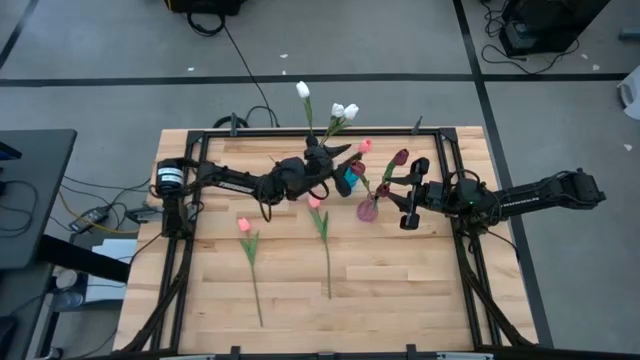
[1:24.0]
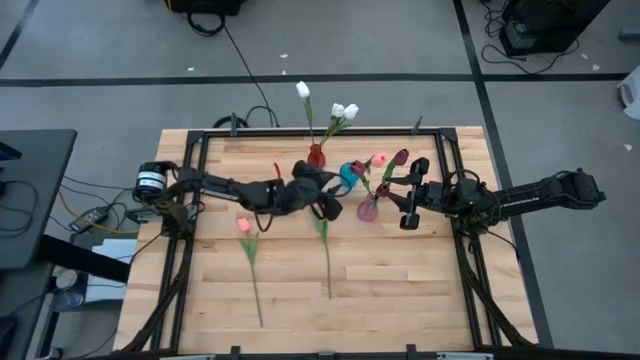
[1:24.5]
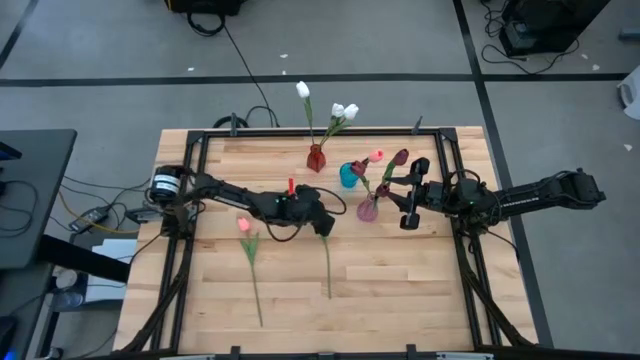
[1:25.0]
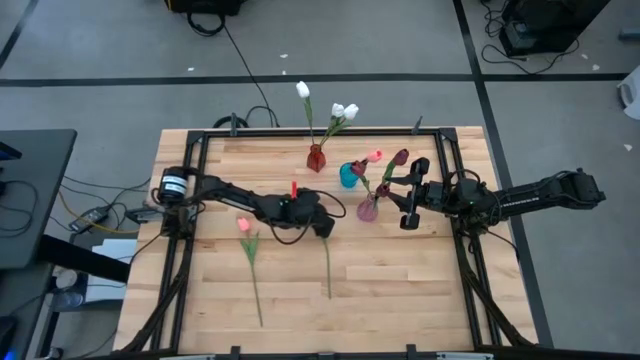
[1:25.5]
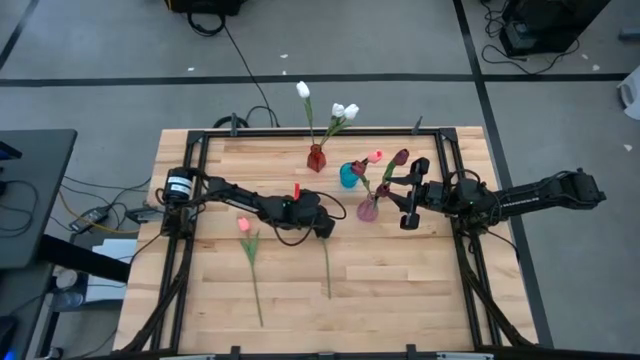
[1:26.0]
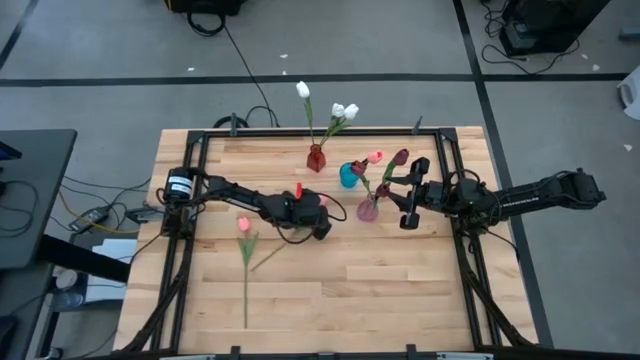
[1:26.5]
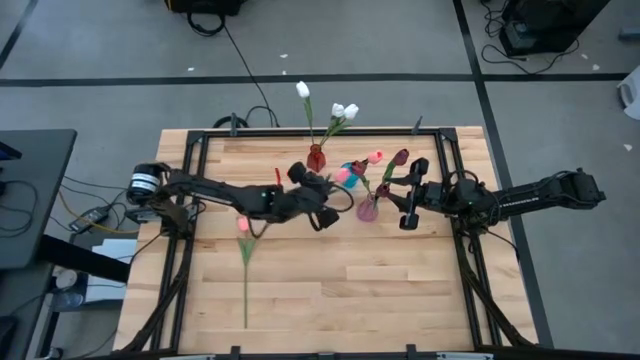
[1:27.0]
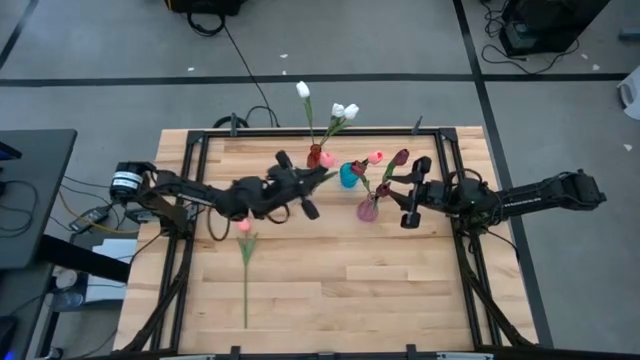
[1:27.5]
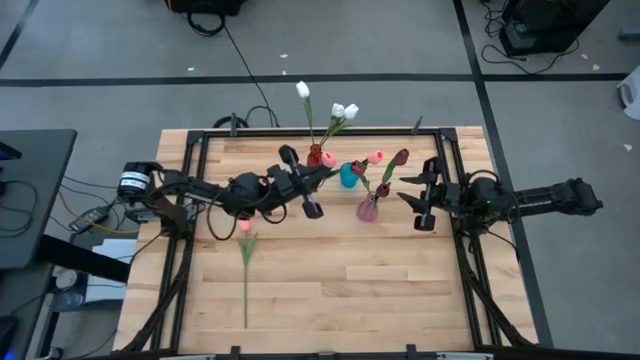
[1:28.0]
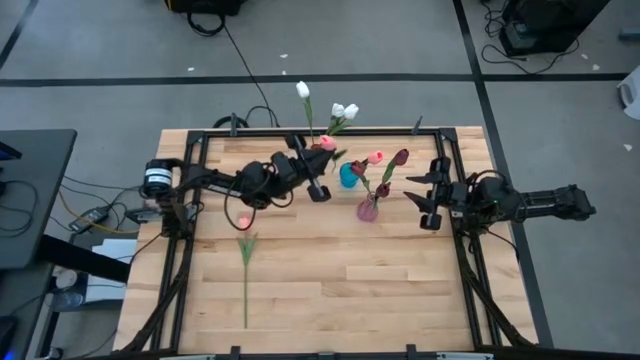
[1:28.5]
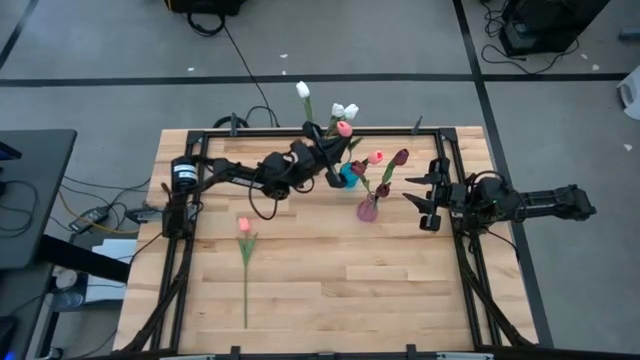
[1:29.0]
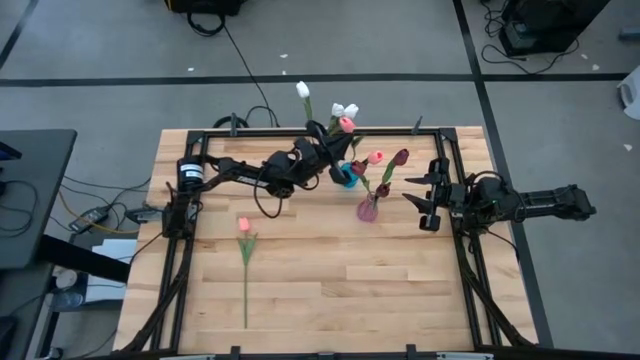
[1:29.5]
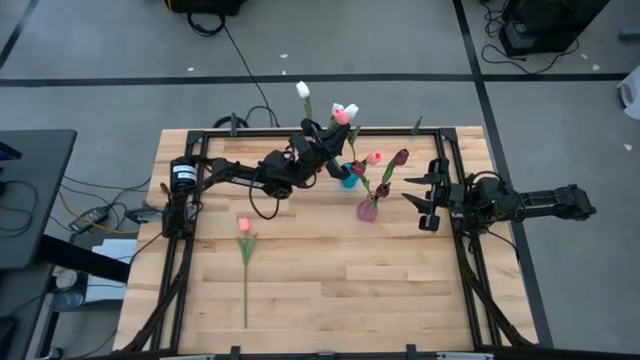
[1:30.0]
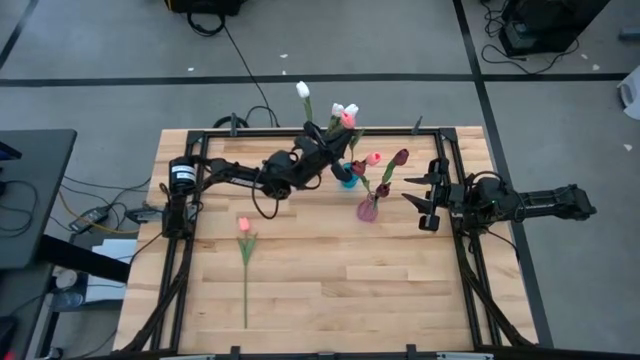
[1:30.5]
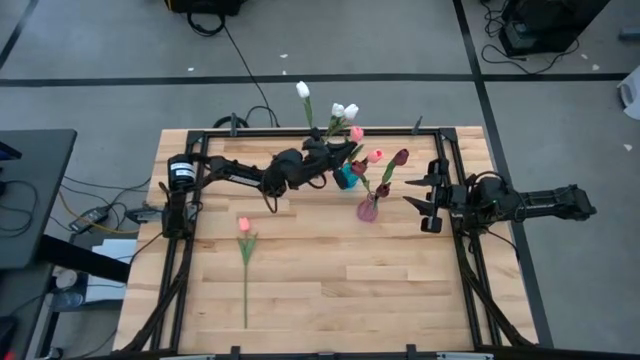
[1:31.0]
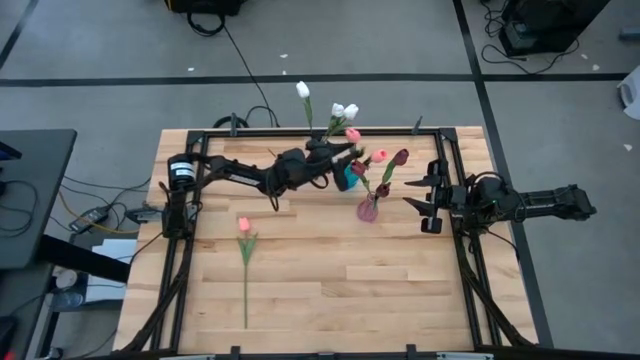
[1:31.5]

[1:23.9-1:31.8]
Task: Sort flowers into vase by color
Put the right pink tulip into the blue vase

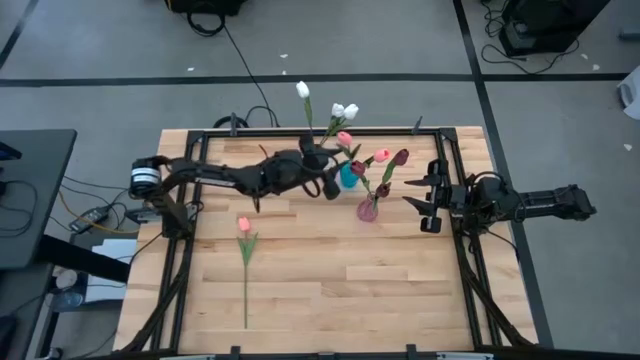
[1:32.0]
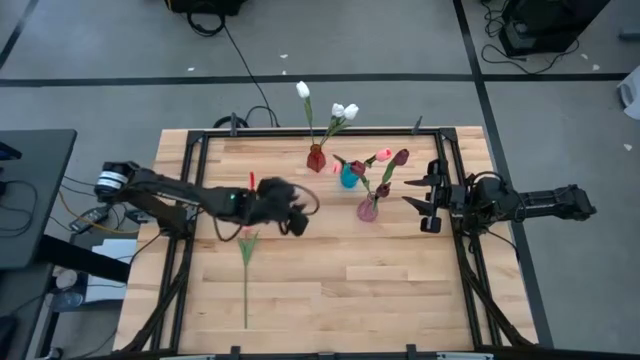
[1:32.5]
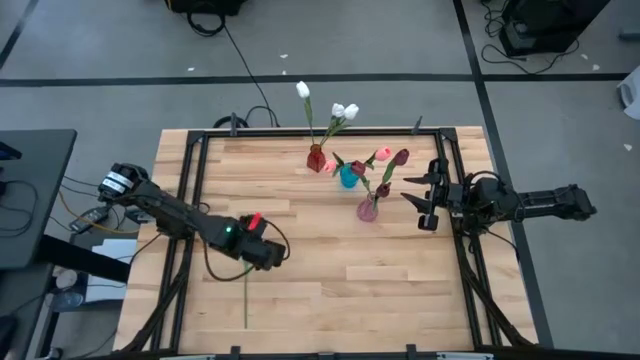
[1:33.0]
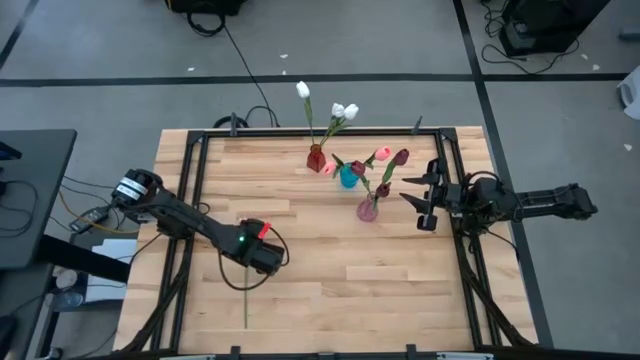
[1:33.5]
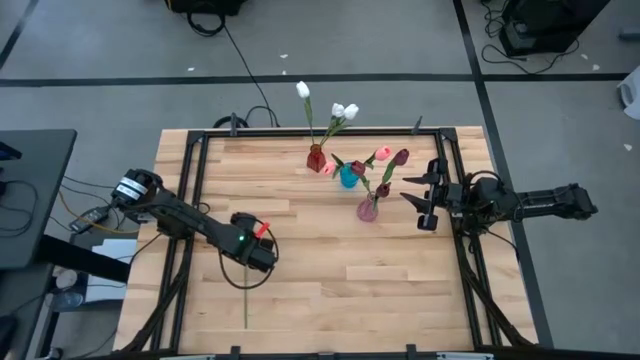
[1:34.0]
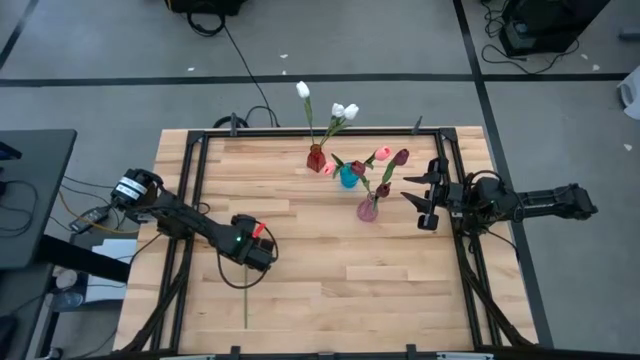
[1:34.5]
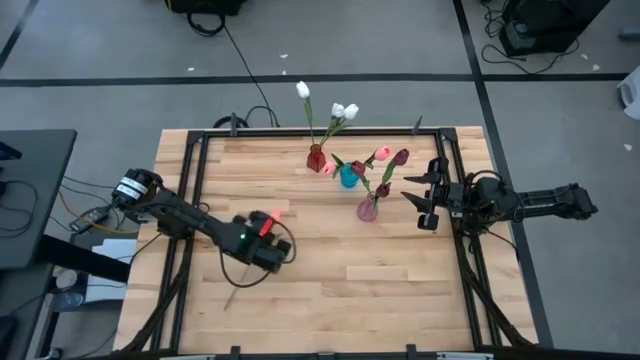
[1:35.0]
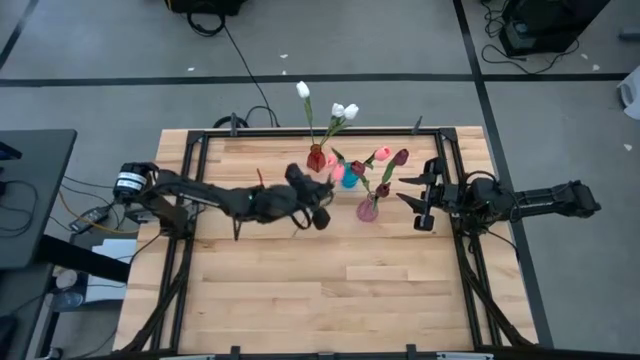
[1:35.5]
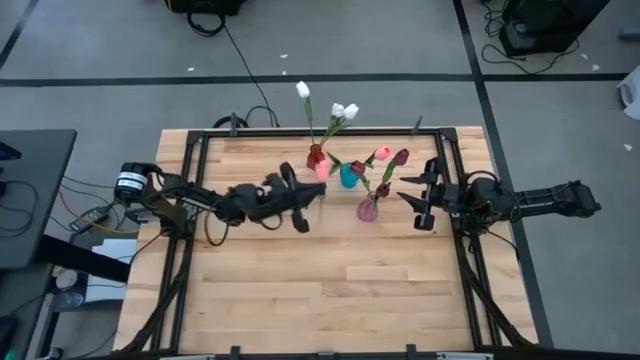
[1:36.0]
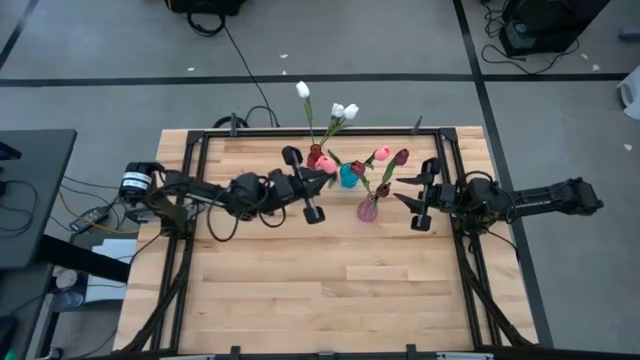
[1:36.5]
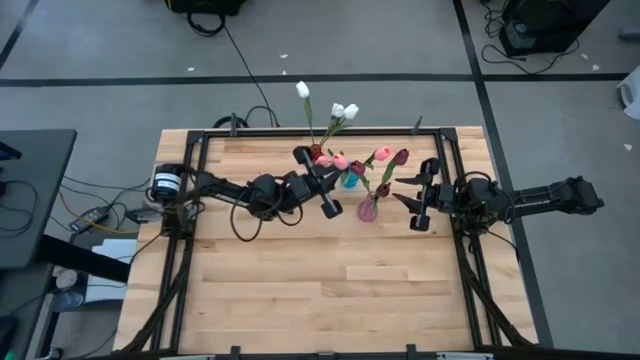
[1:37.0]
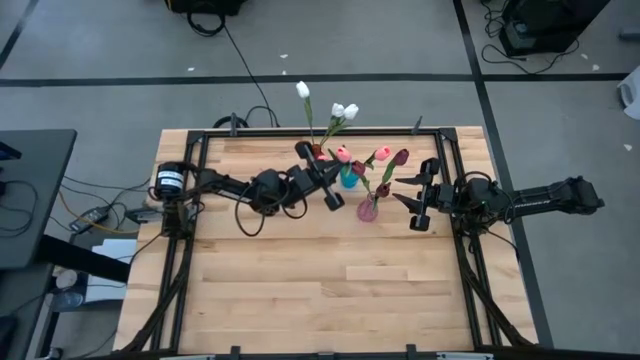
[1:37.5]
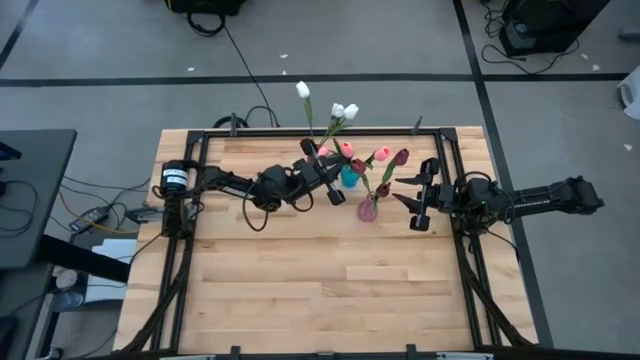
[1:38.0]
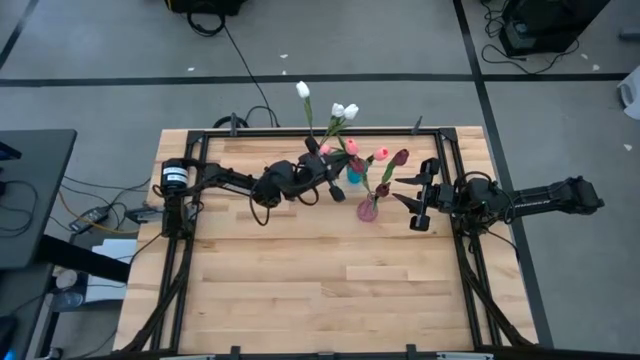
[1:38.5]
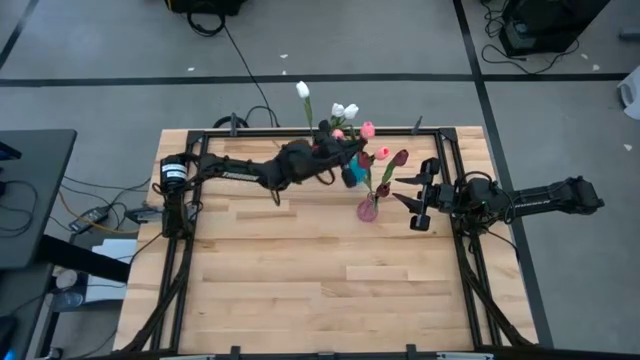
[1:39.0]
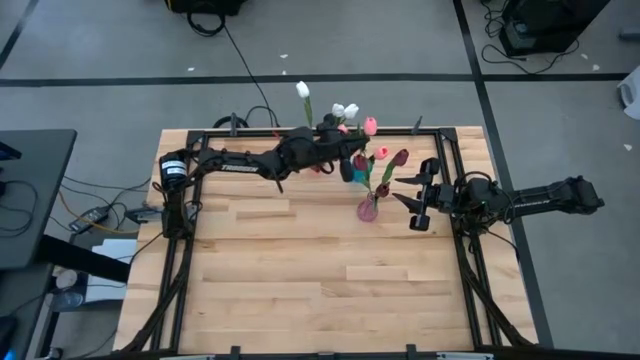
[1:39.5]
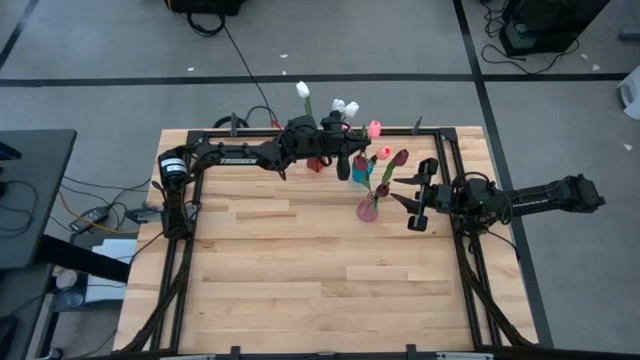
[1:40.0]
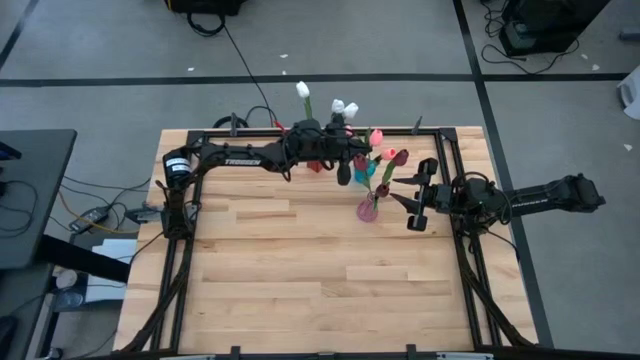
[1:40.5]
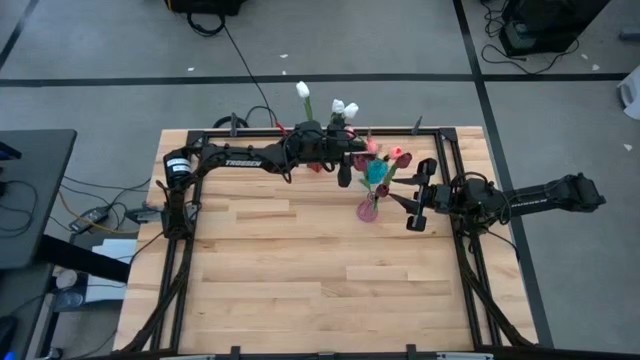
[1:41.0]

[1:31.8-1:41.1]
Put the pink tulip into the blue vase

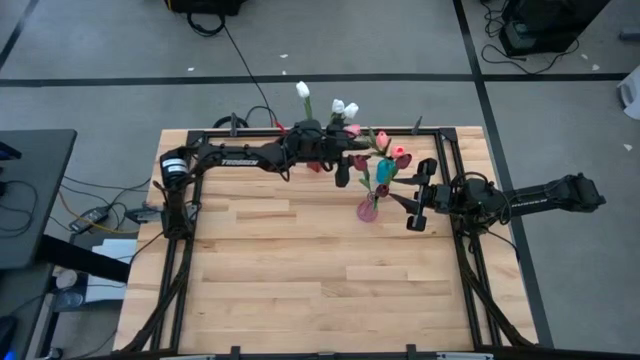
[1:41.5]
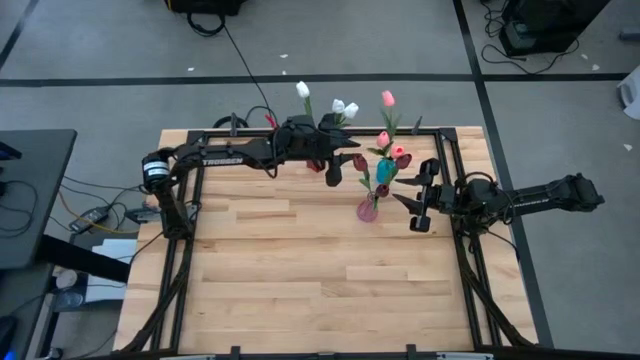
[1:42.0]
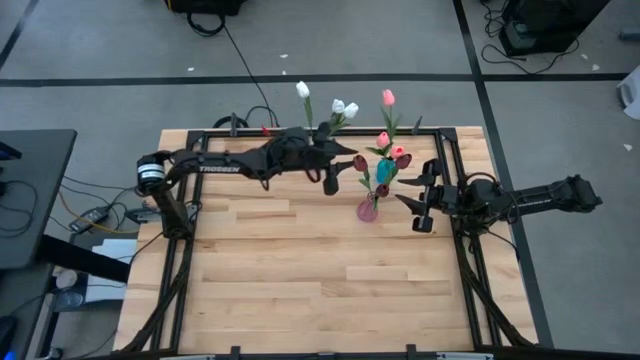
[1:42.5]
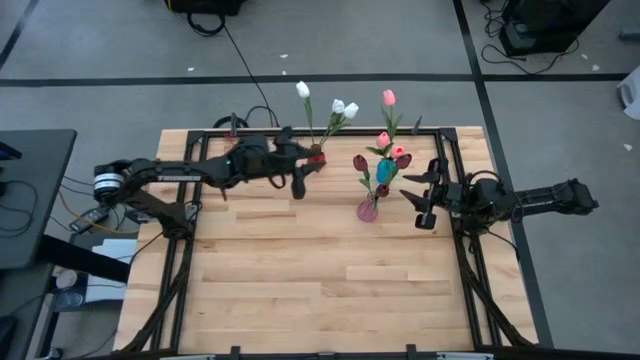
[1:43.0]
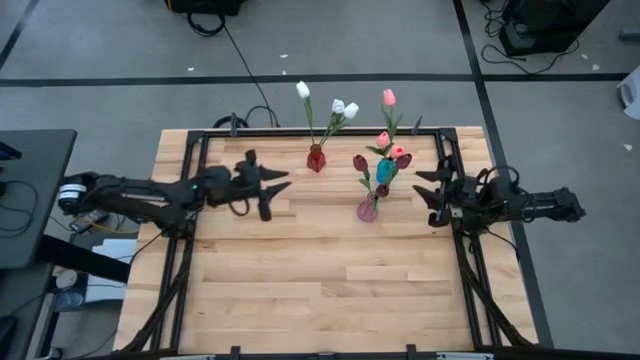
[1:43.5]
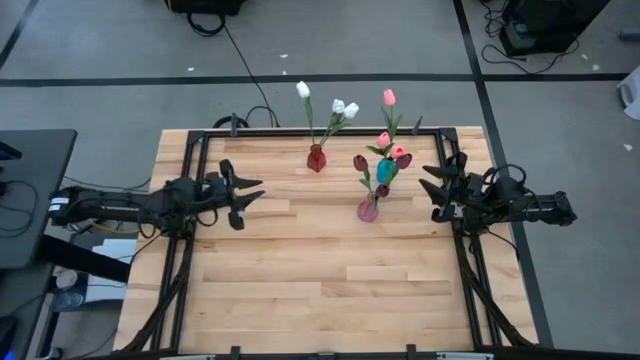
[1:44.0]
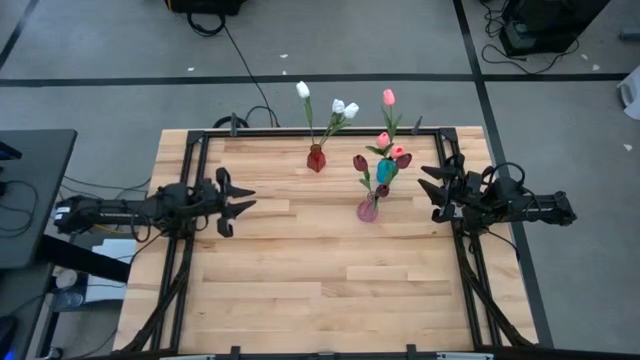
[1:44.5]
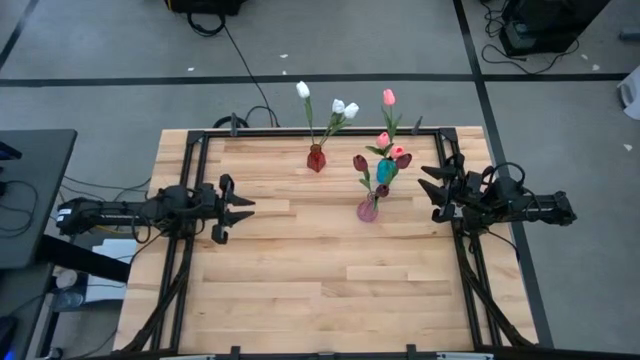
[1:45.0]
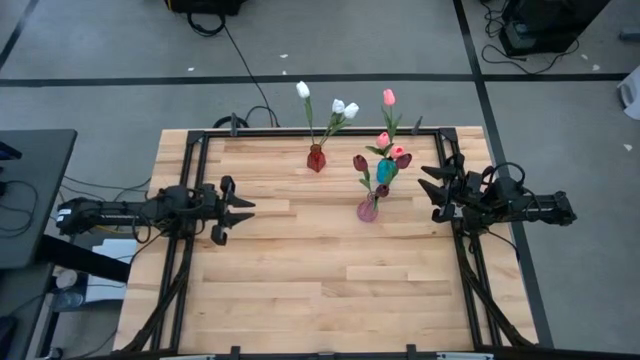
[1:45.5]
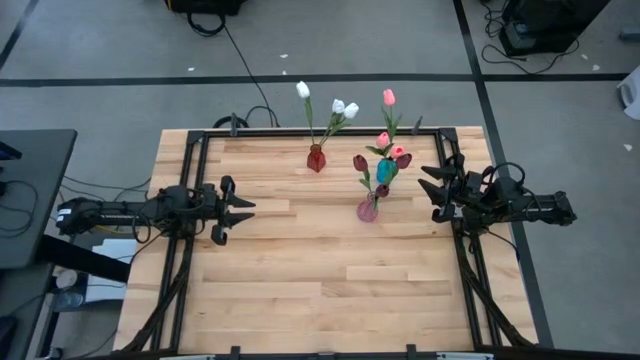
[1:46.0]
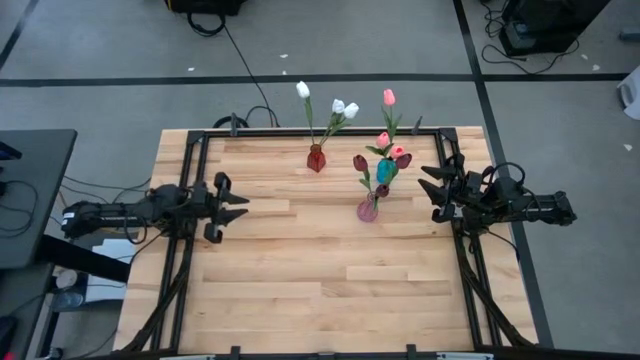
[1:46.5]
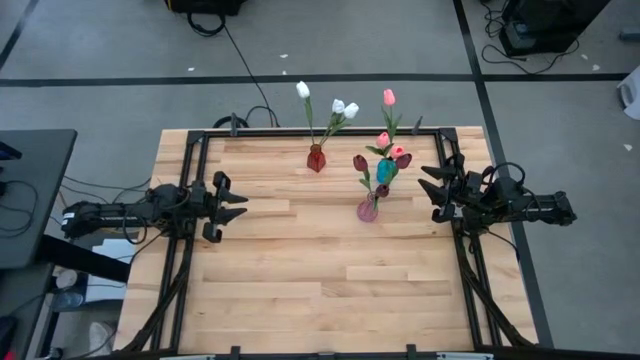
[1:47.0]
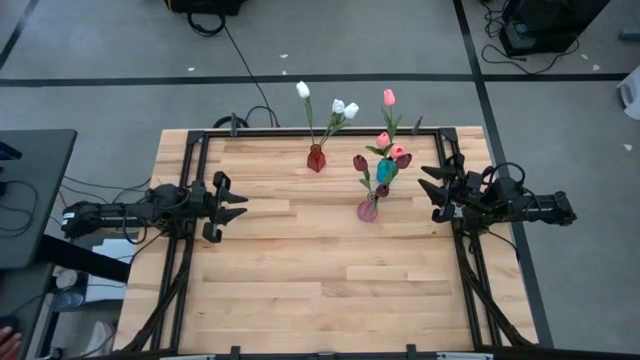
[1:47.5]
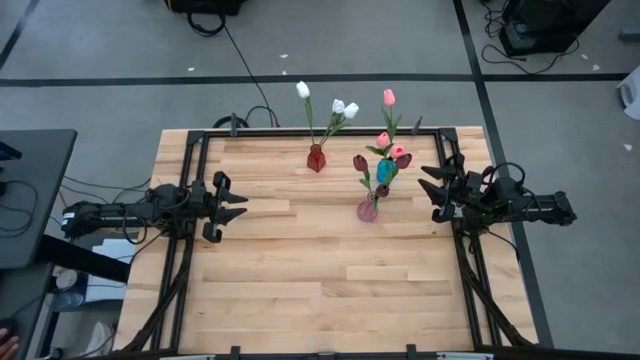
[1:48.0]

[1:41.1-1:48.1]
Return to Home Position
